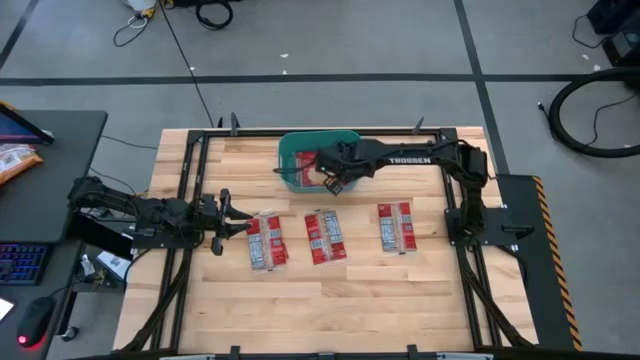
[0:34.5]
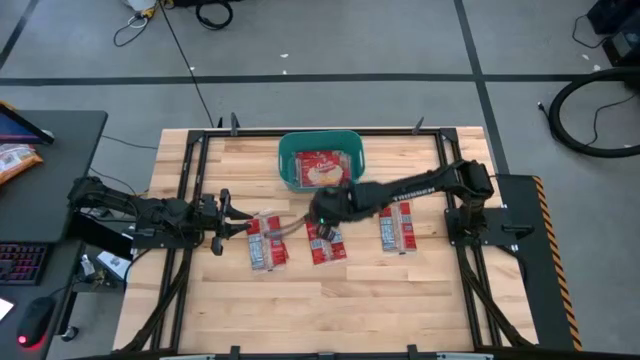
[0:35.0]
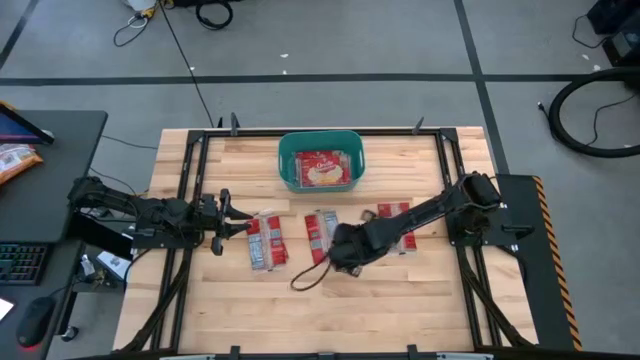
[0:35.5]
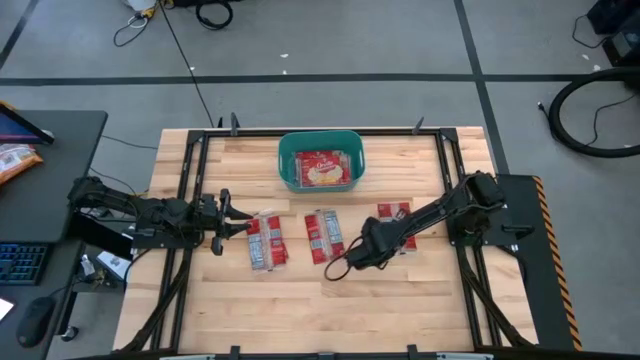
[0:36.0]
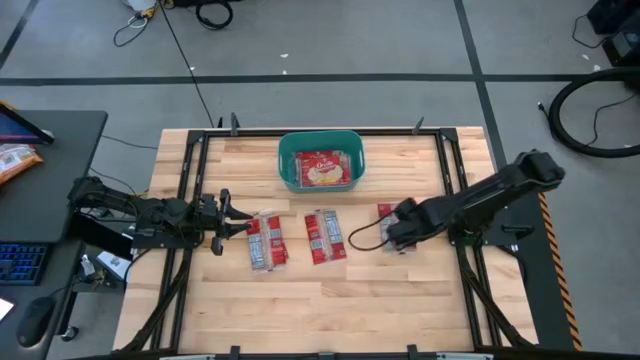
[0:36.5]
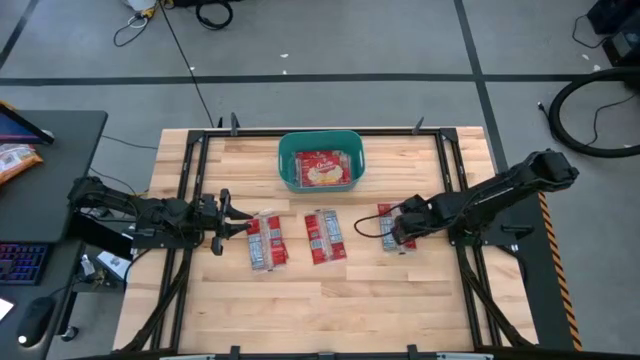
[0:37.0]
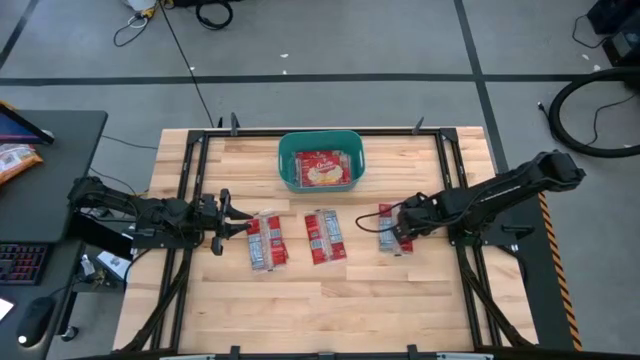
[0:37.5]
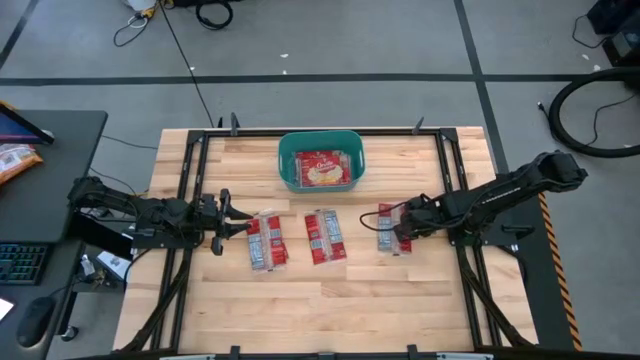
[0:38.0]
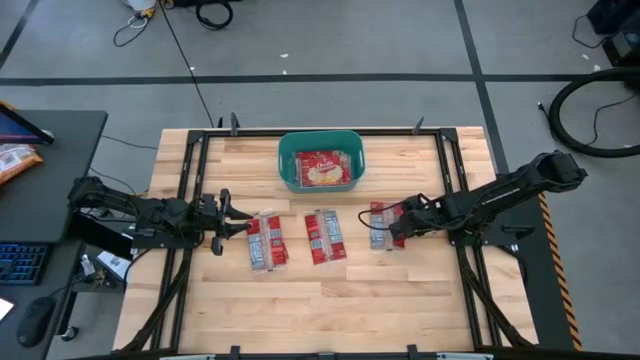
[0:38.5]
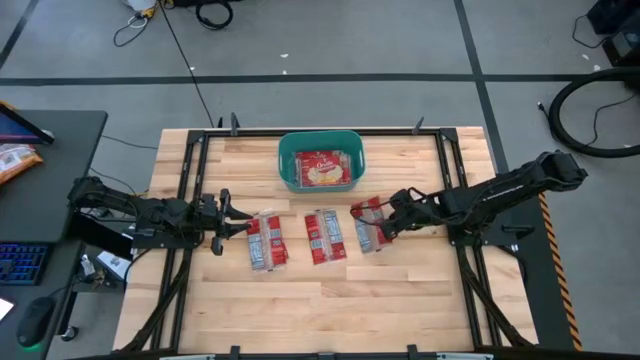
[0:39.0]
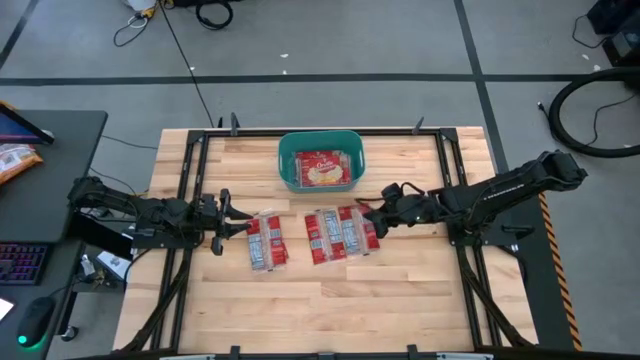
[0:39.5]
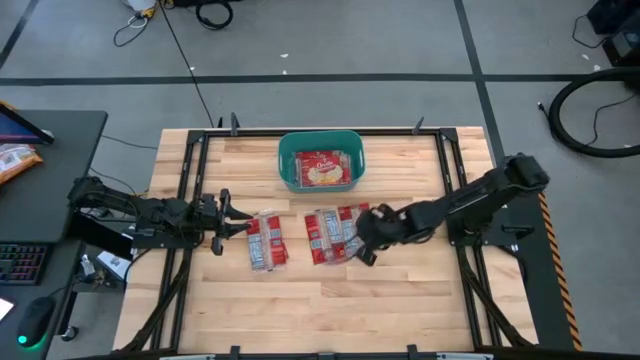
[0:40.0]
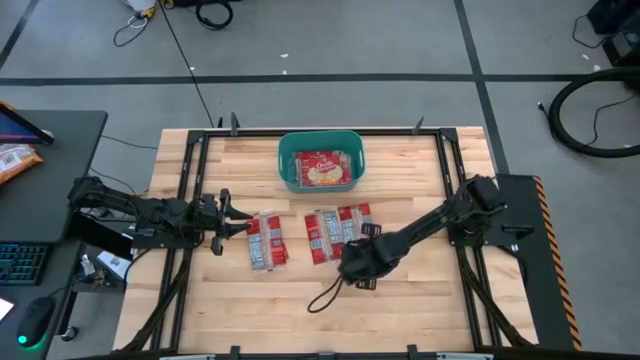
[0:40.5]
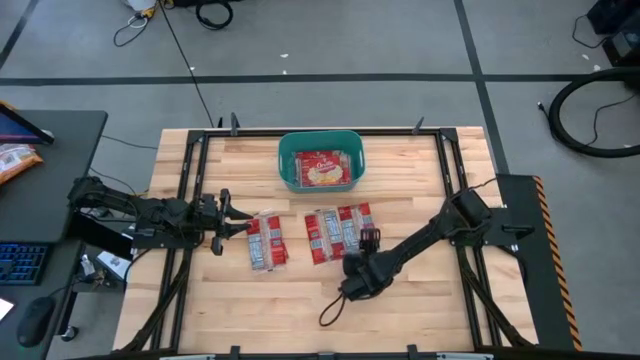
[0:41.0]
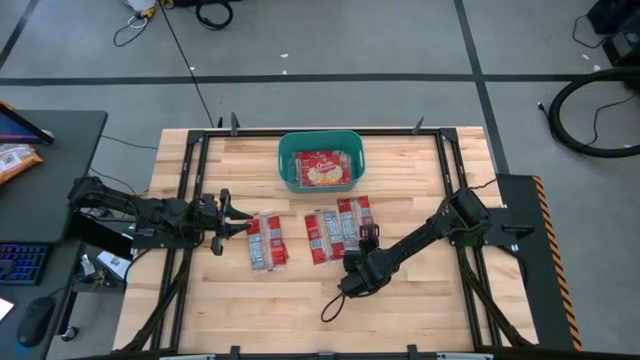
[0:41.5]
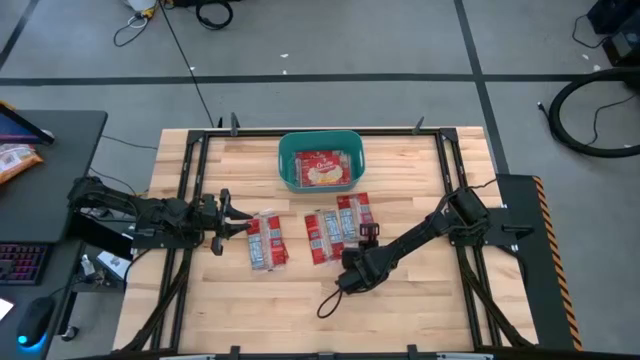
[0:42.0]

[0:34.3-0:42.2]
Task: Sort popcorn bags into baskets
Put the red popcorn bag into the blue bin

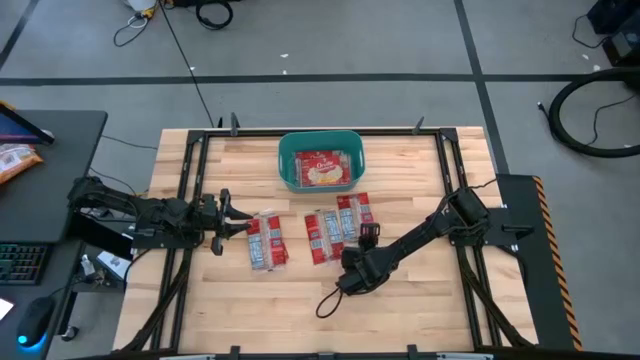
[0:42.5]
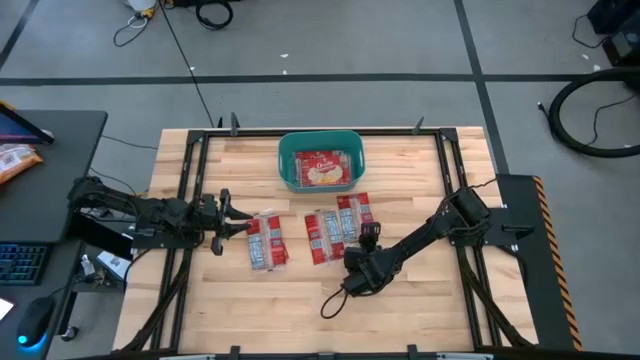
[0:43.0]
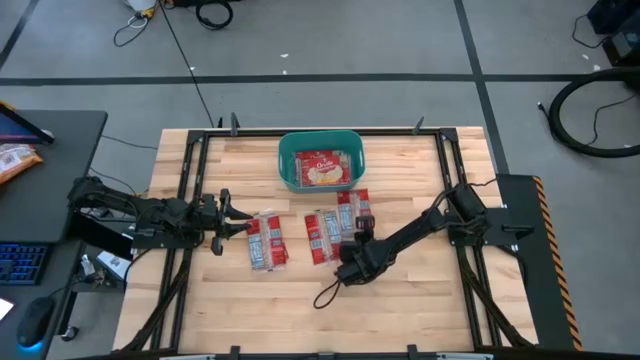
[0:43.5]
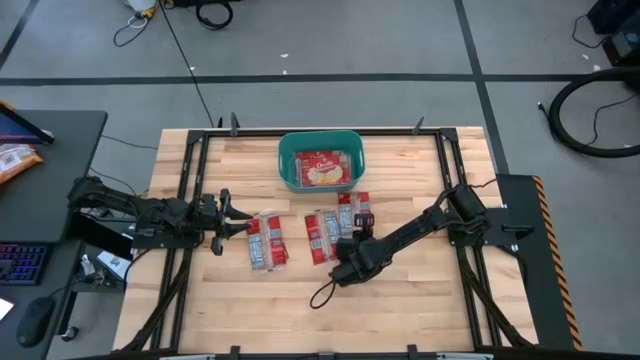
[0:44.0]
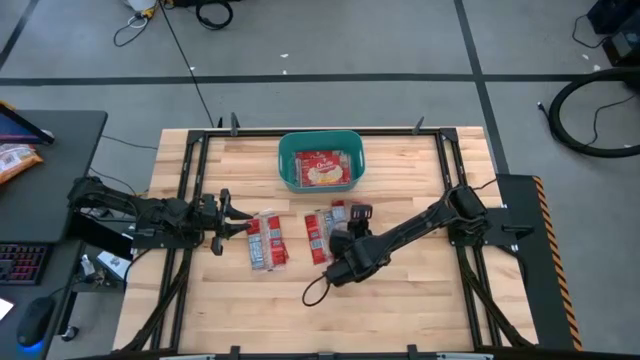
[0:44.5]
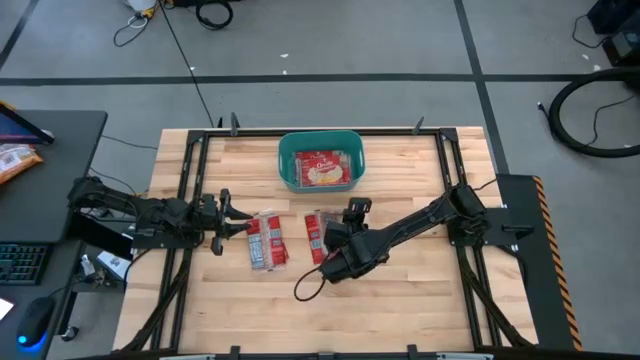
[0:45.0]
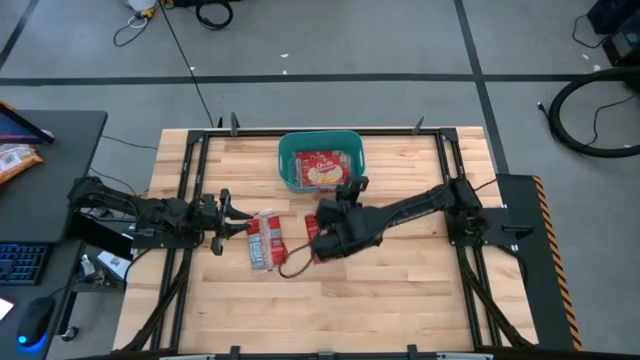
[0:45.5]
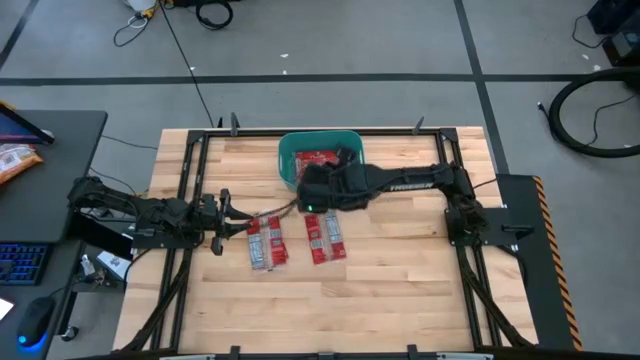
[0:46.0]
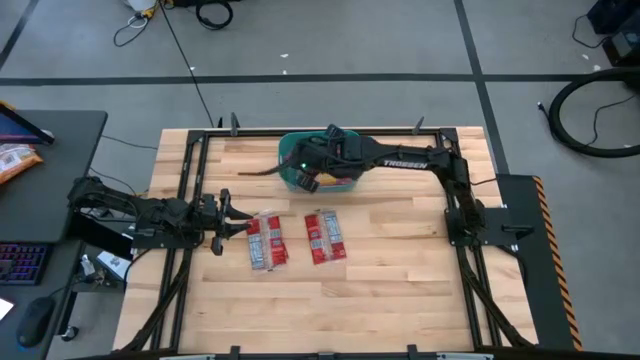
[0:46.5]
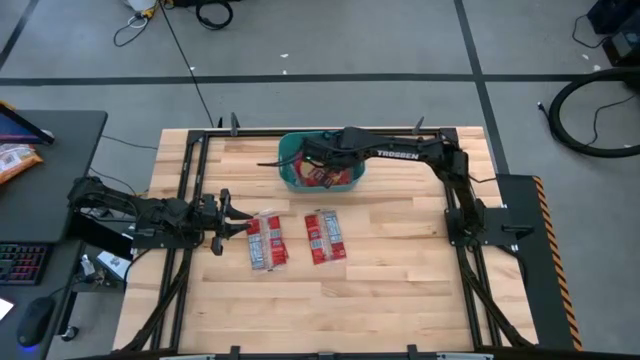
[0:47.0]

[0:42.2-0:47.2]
Put the red popcorn bag into the blue bin

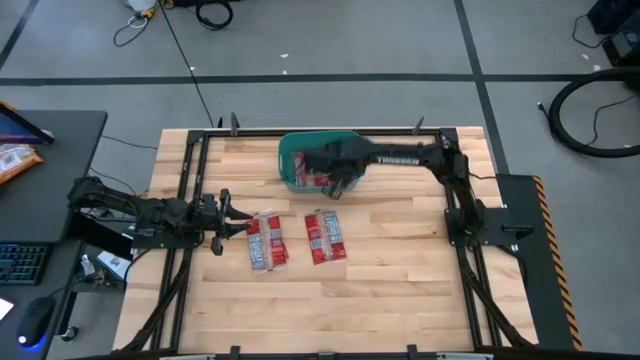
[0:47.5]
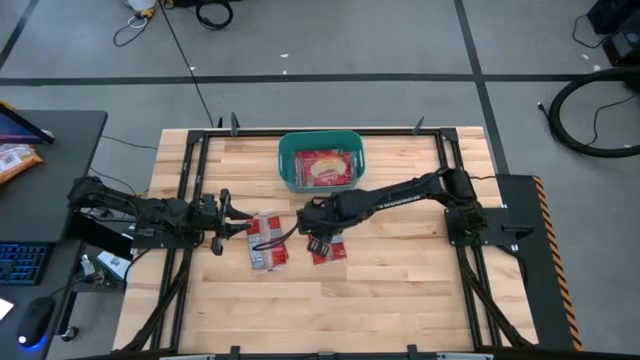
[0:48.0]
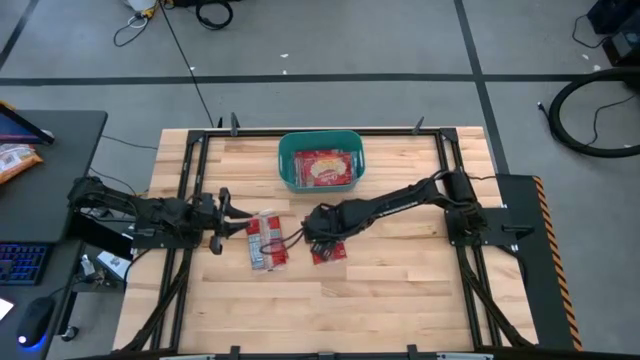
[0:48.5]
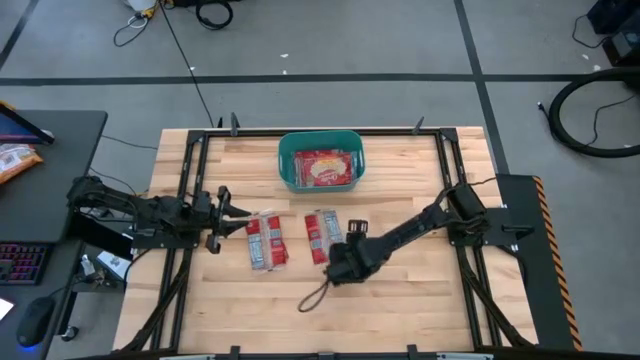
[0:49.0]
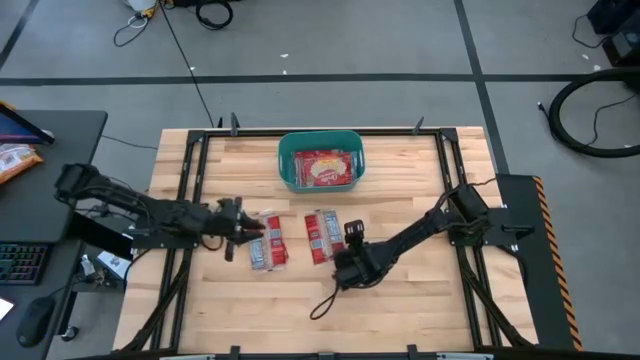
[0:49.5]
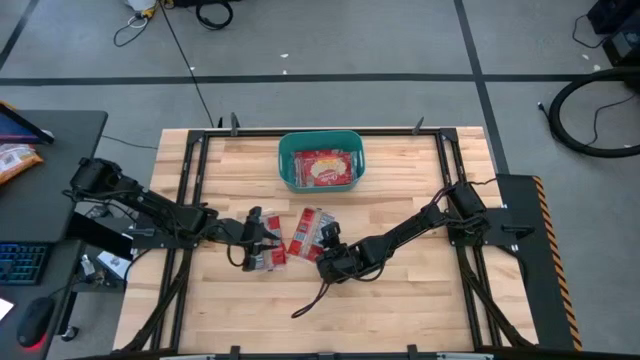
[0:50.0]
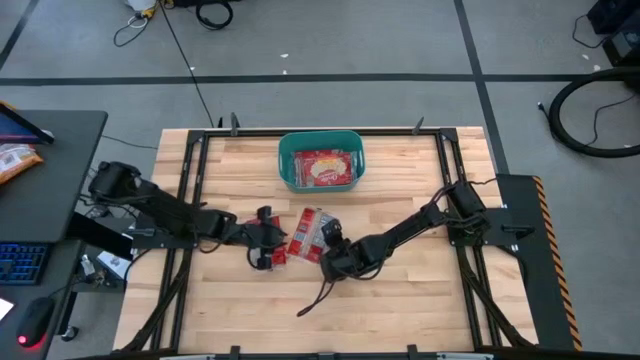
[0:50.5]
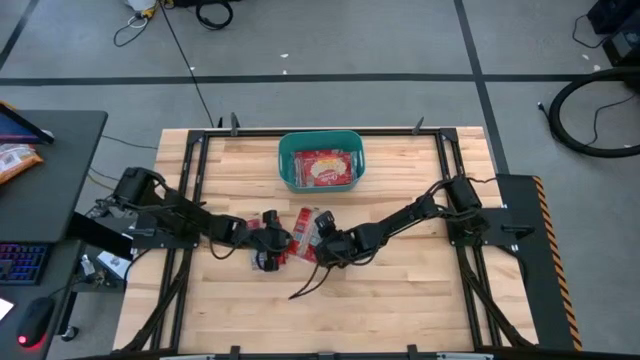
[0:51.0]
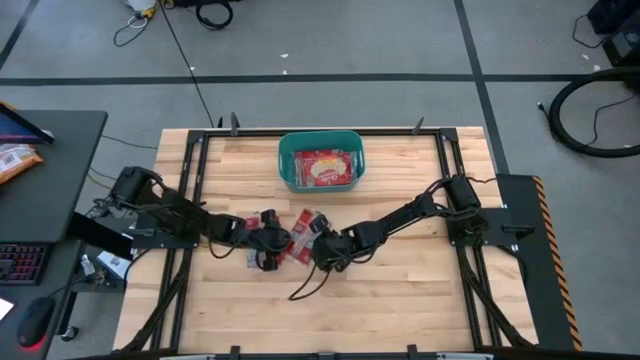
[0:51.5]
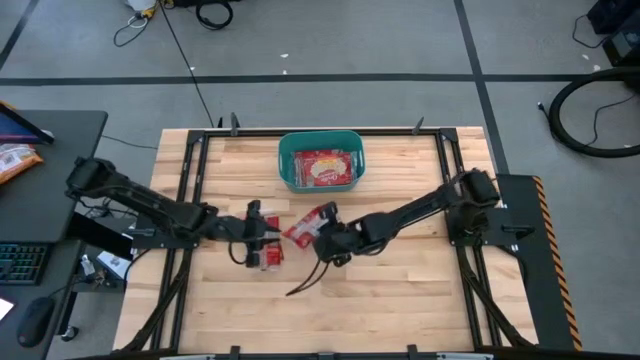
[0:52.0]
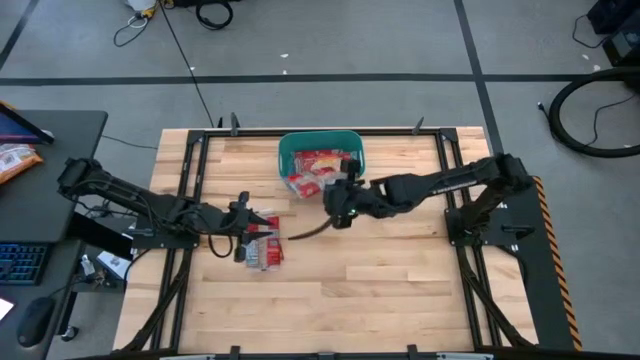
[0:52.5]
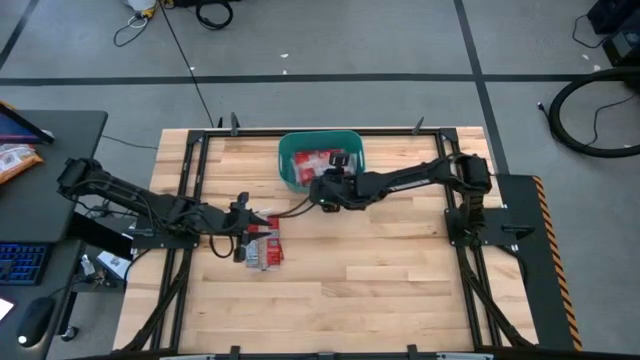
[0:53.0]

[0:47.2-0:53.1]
Put the red popcorn bag into the blue bin

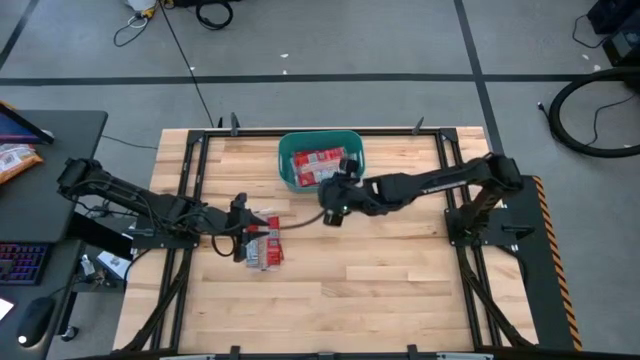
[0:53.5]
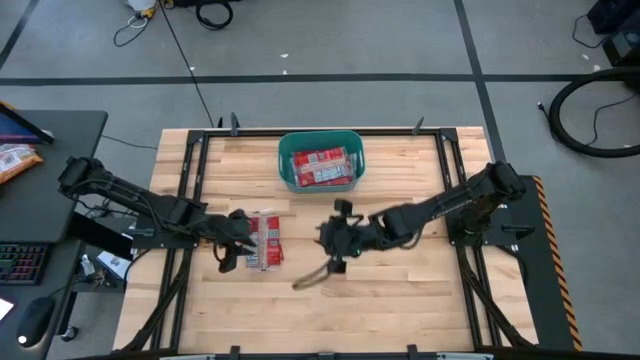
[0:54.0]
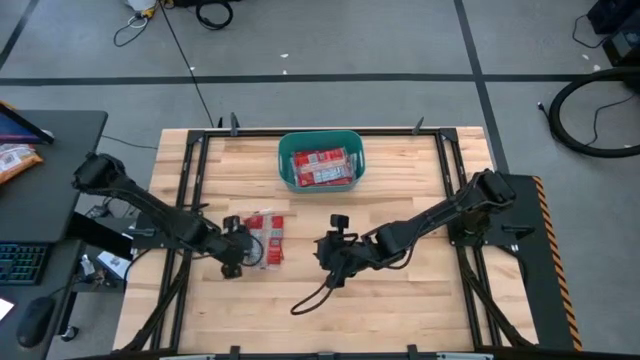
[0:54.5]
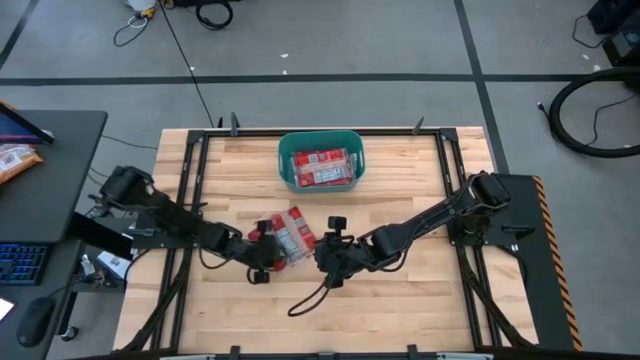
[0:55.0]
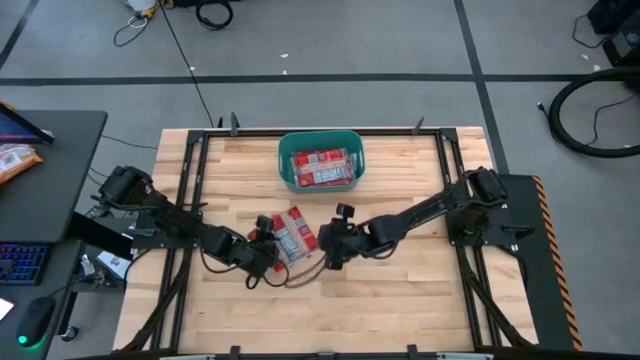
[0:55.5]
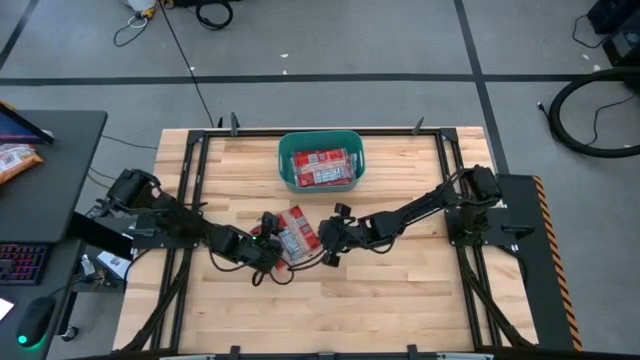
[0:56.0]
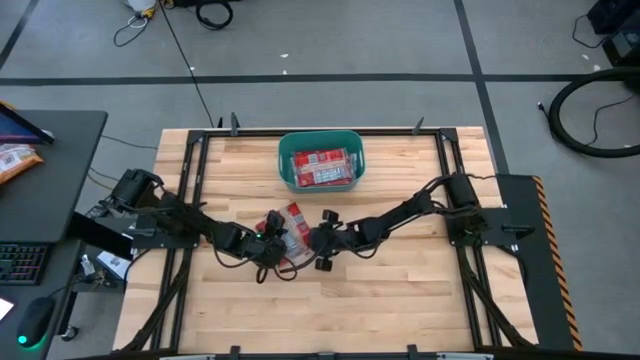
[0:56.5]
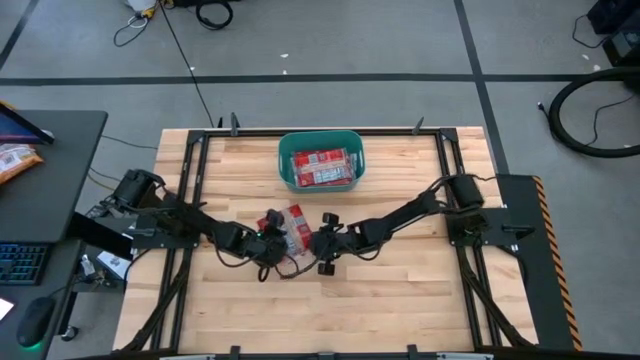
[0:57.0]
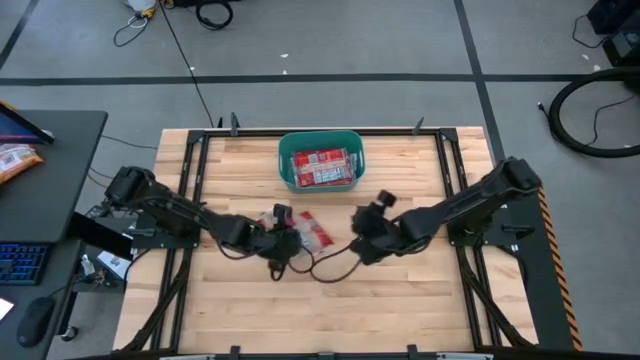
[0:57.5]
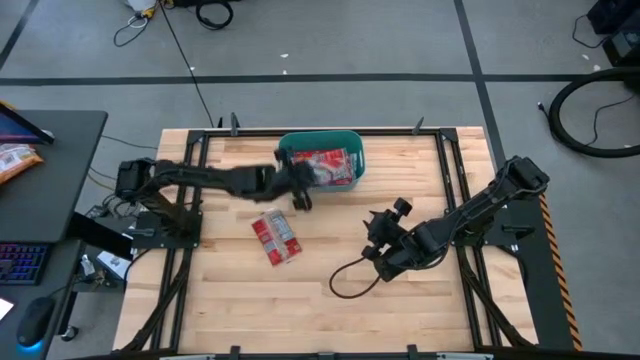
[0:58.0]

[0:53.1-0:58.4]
Put the red popcorn bag into the blue bin
